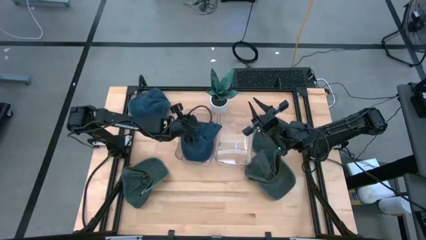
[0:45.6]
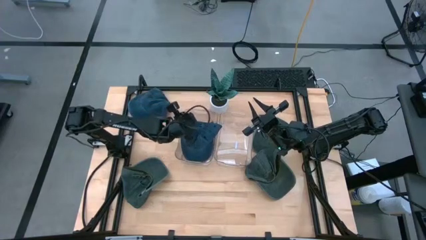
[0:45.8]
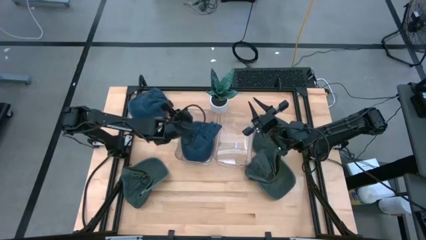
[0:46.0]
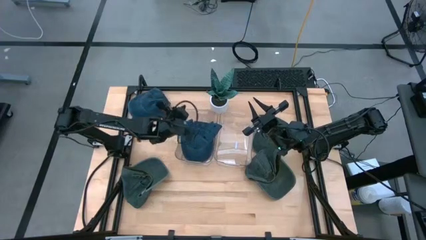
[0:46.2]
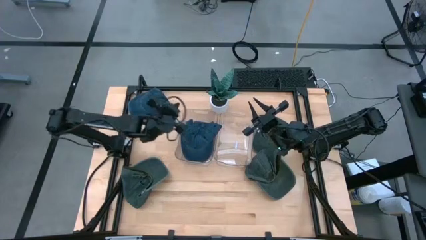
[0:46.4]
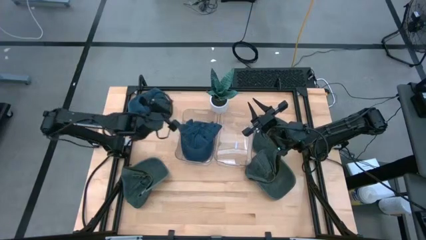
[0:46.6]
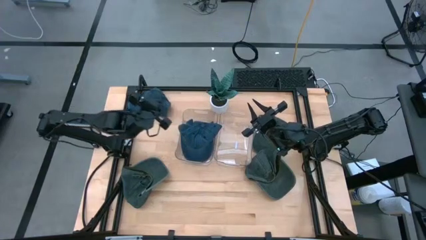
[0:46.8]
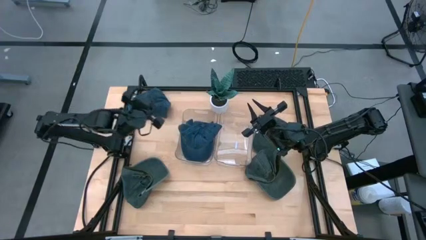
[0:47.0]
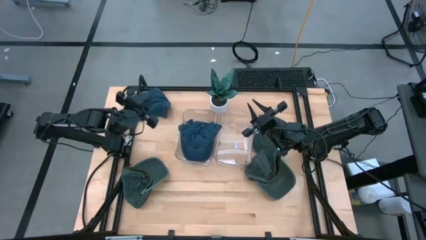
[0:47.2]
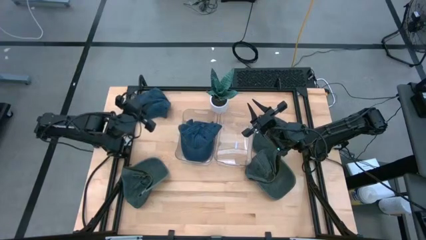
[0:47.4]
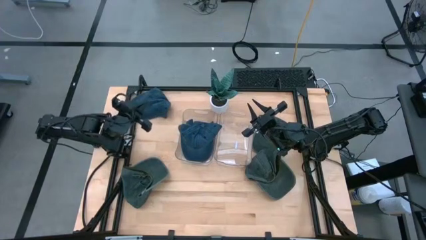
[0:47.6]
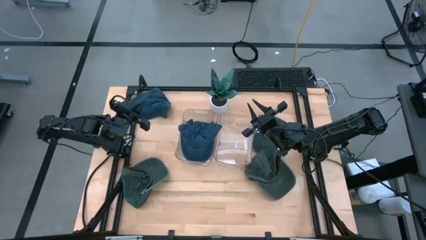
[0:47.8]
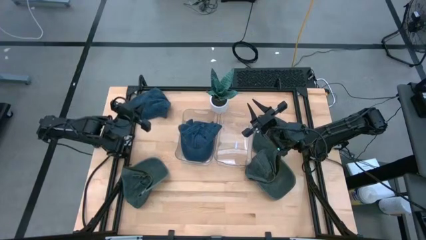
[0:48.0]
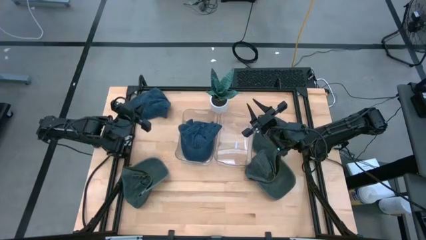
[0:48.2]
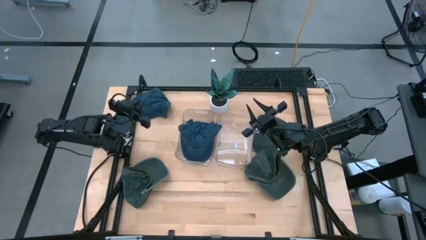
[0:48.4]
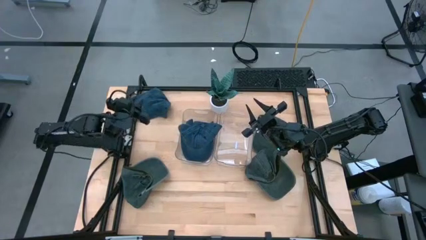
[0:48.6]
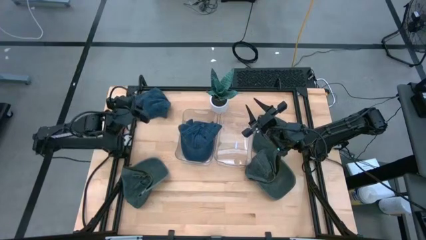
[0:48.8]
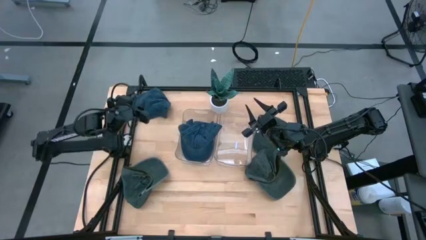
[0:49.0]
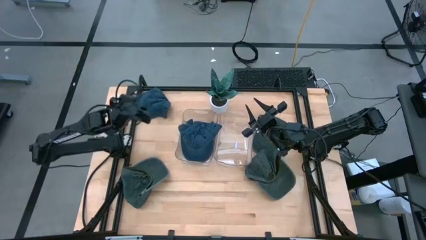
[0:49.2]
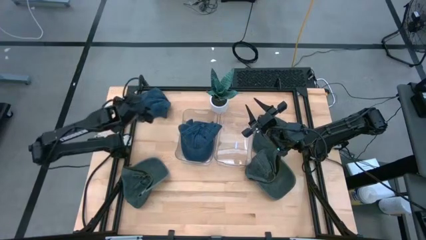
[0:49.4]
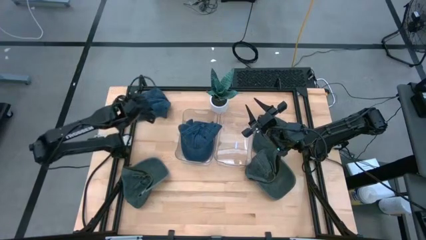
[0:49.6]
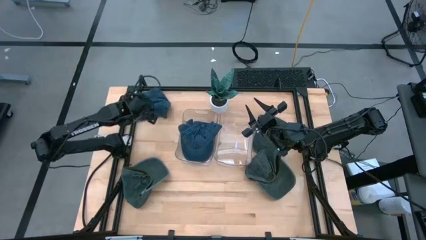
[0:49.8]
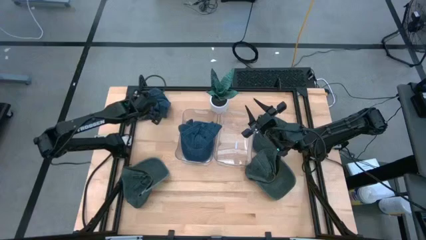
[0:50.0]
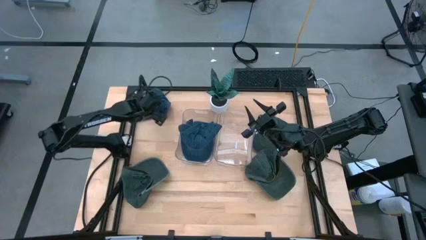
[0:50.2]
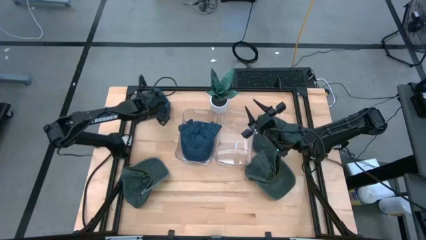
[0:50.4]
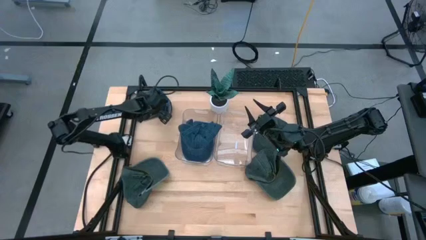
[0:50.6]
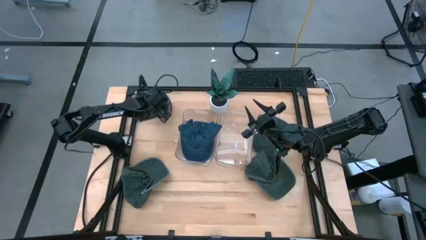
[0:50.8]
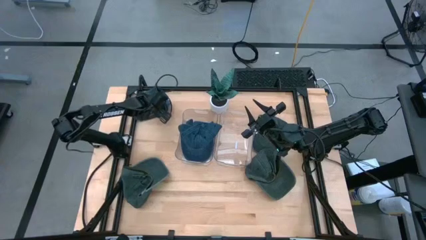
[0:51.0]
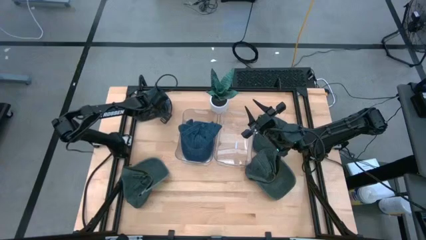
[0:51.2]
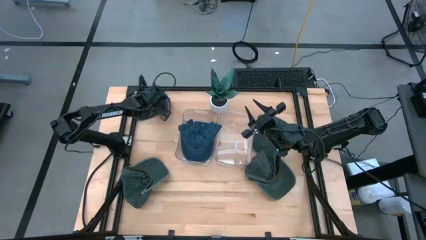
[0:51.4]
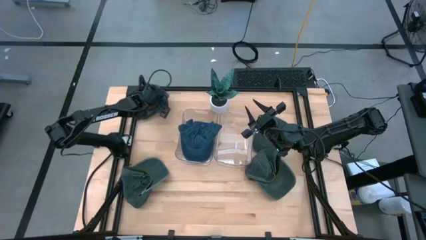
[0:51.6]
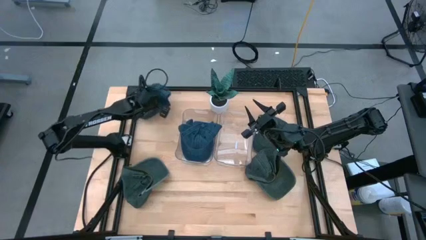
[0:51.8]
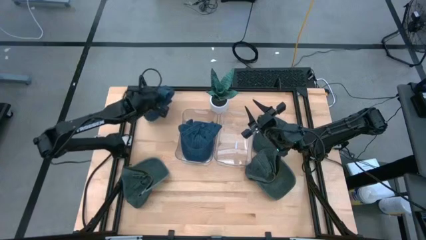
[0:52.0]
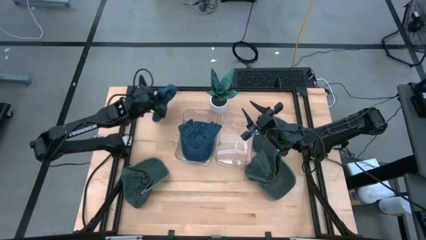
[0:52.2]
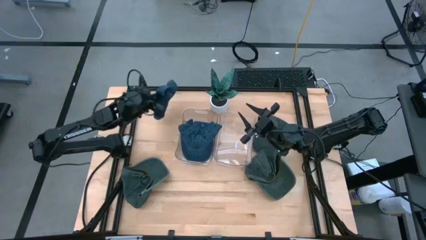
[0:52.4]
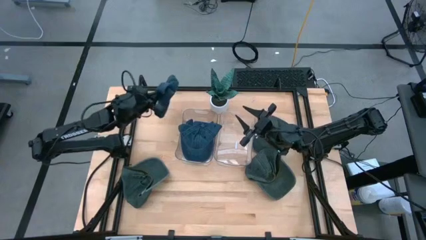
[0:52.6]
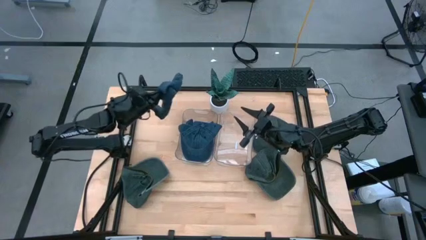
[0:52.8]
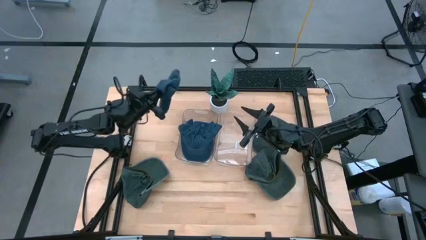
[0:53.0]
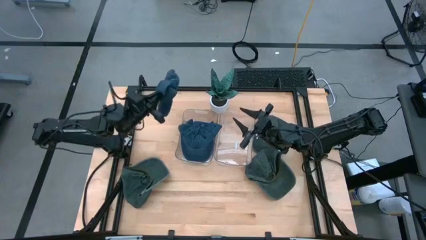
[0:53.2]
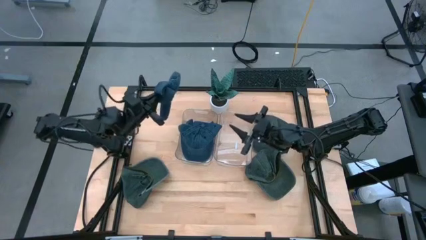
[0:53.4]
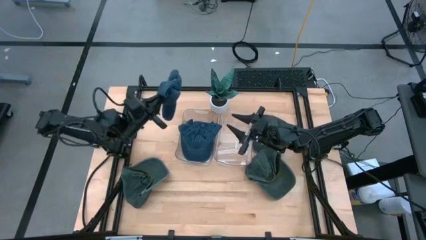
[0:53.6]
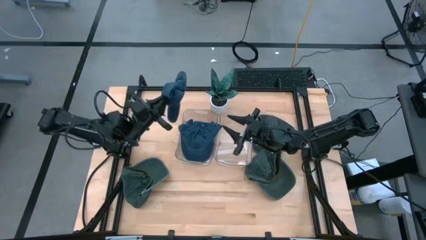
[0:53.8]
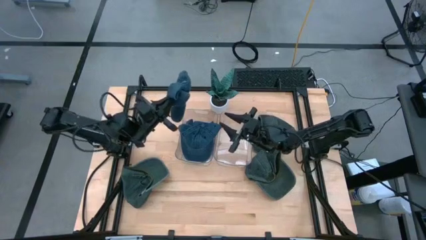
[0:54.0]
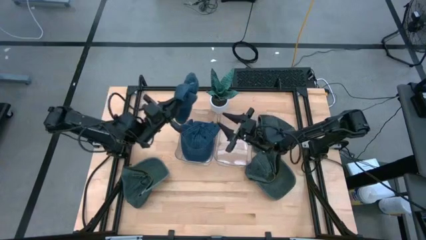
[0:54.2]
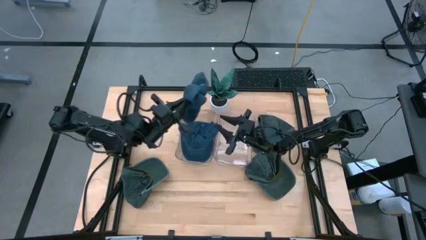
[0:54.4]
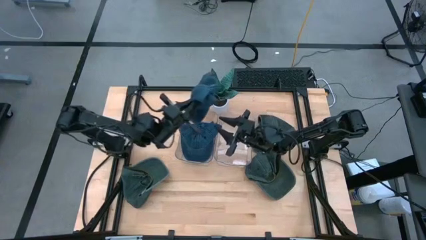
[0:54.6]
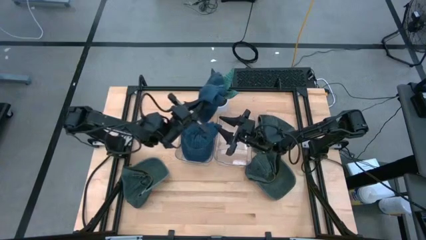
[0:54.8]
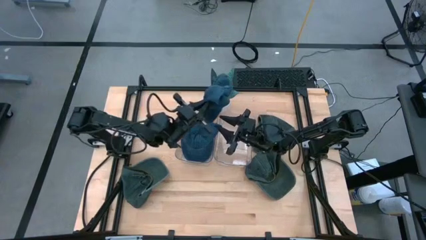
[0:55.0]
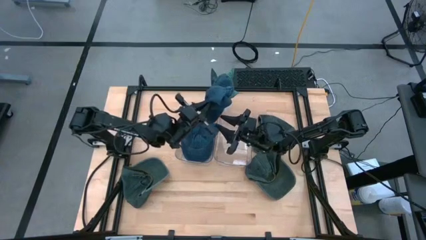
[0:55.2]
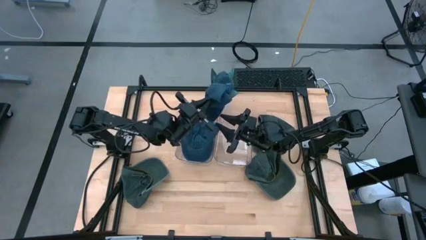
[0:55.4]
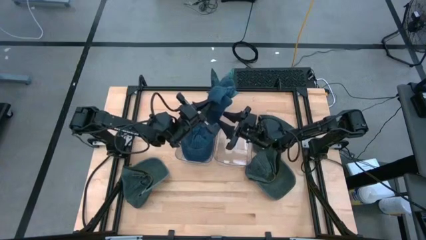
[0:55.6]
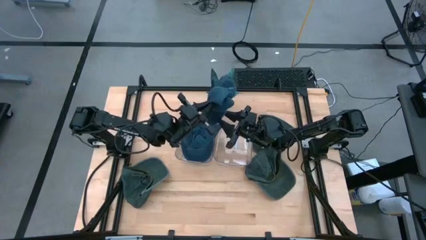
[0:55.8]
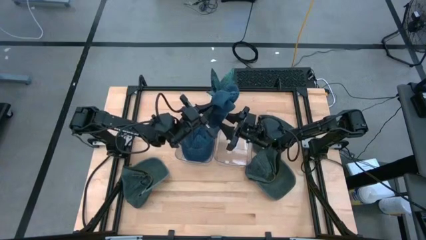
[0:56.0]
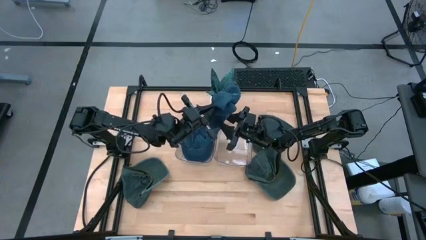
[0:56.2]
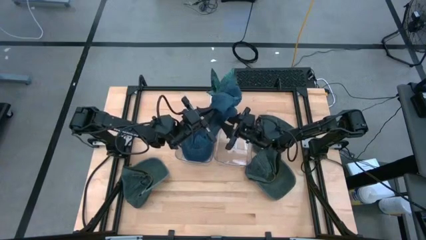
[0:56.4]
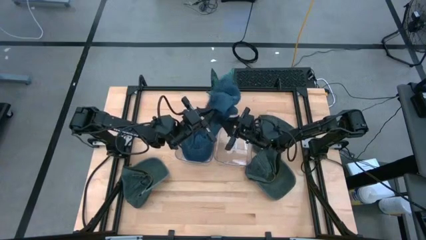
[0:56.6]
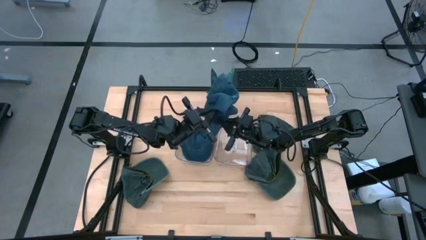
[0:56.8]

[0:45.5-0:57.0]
Task: Pick & Place hat
Put the blue cap into the left transparent bin

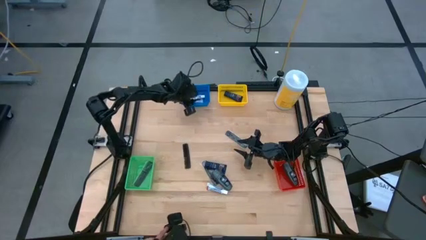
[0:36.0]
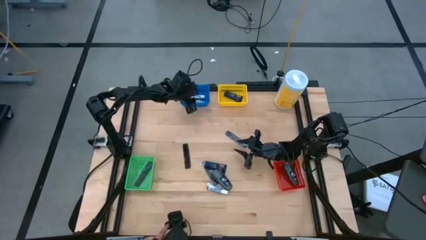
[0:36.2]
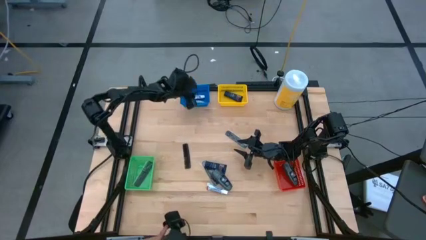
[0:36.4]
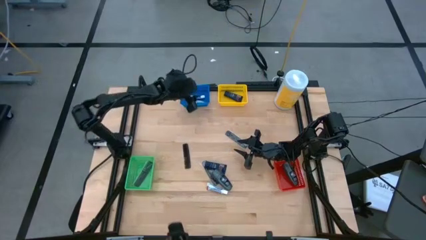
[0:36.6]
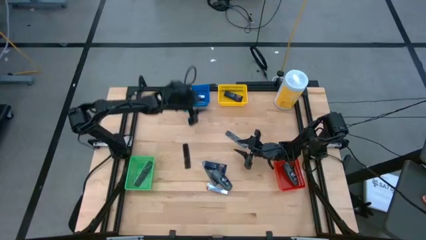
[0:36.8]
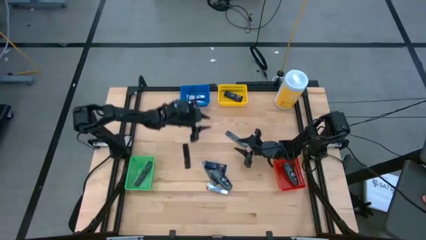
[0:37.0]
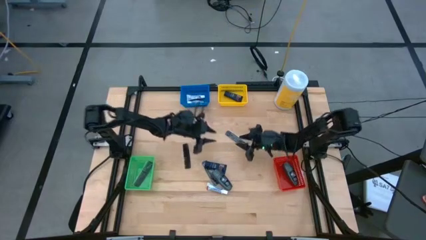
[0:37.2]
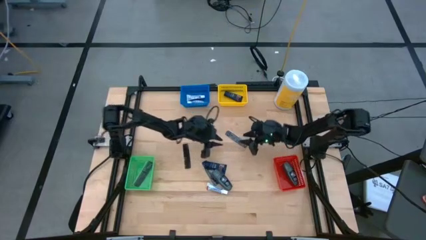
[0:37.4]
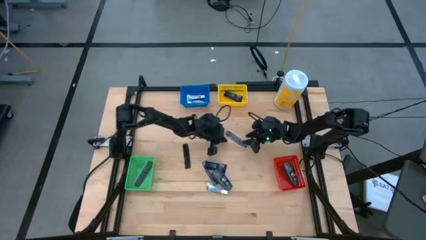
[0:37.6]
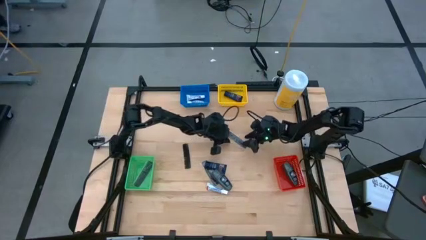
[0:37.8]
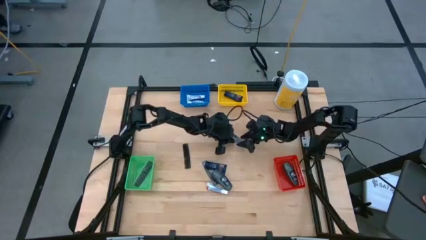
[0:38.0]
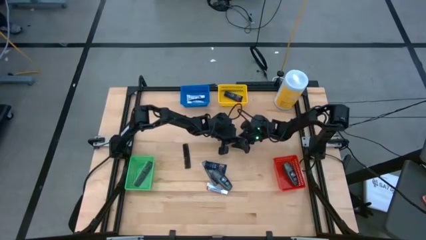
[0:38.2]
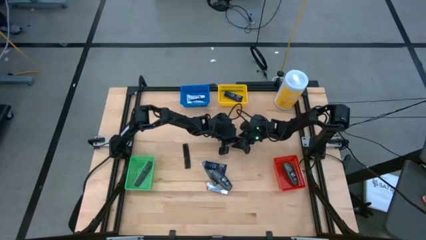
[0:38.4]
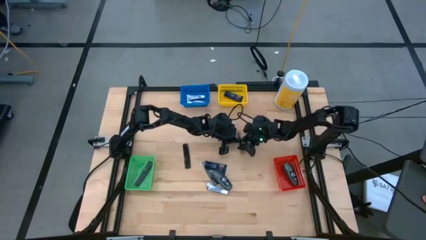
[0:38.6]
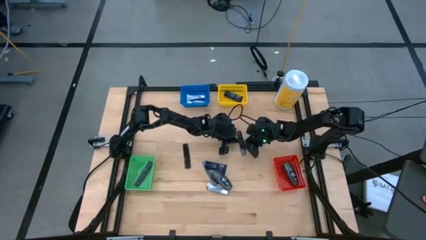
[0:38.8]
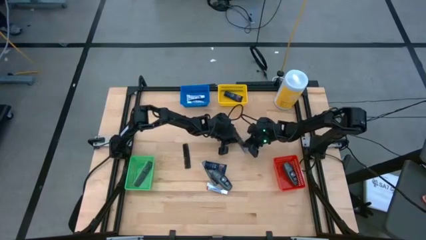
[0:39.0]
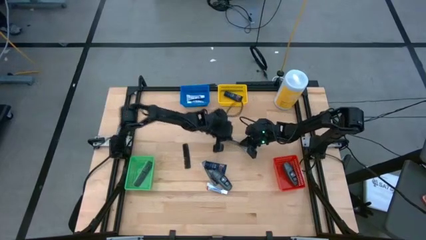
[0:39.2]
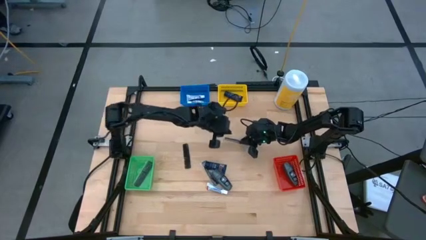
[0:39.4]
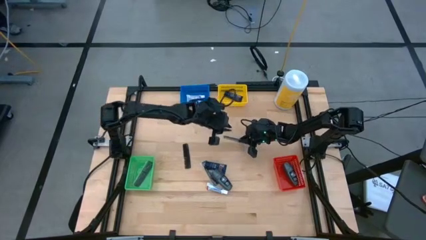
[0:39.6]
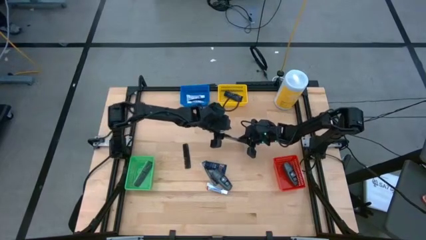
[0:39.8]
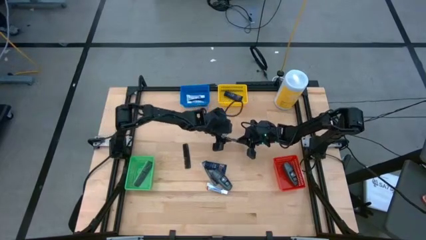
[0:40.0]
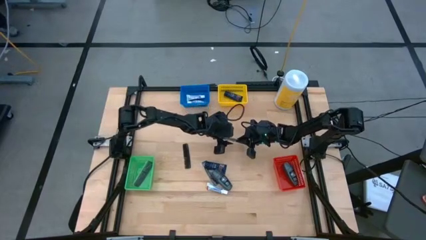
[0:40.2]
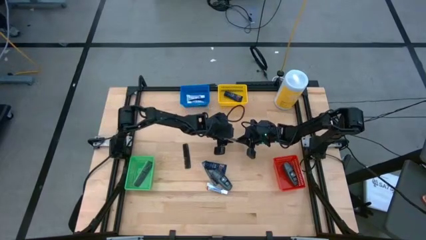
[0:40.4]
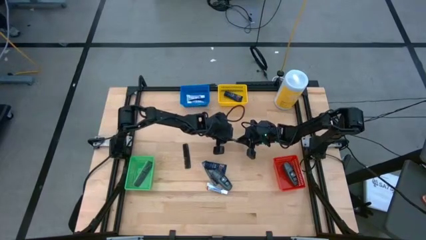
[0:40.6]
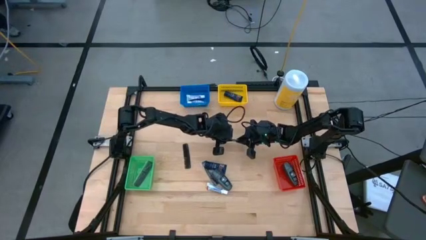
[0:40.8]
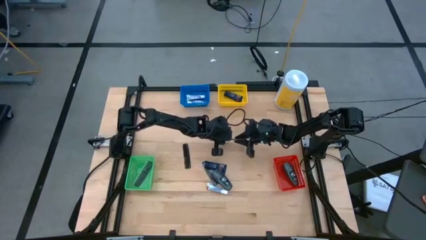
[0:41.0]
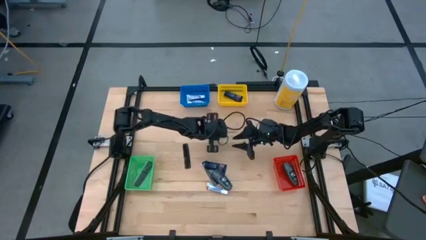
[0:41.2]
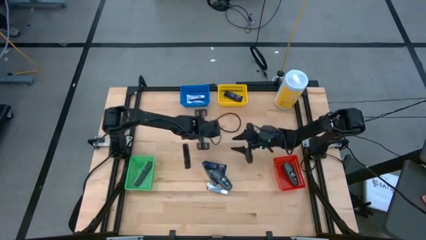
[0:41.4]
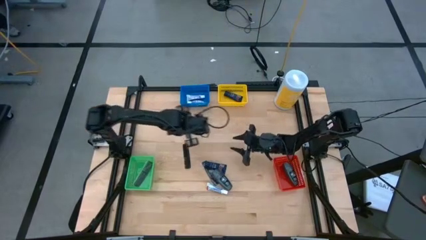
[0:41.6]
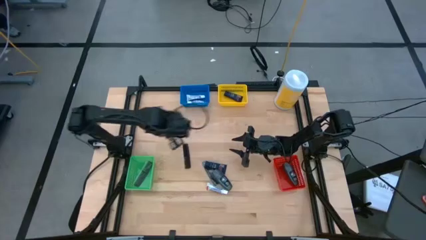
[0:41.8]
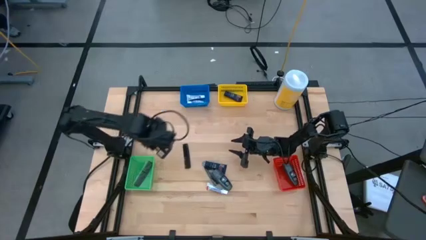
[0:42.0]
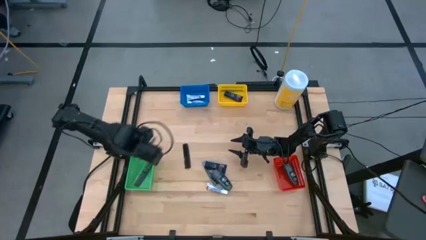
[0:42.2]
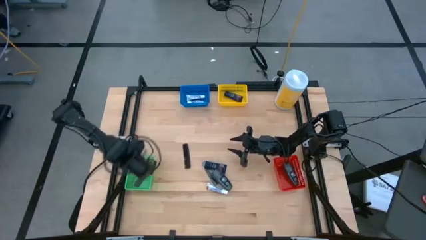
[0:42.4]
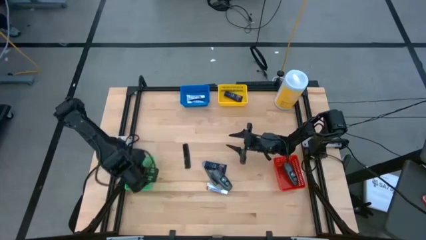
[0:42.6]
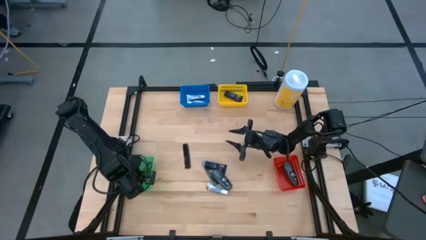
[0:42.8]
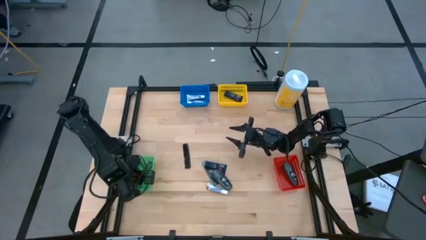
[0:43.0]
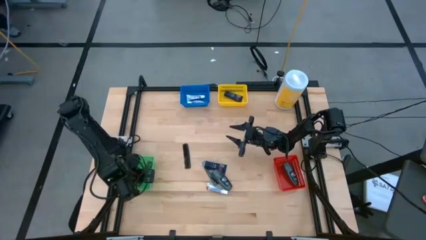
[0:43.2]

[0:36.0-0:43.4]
Task: Pick & Place Travel size toiletries
Put the black hair comb into the green bin
